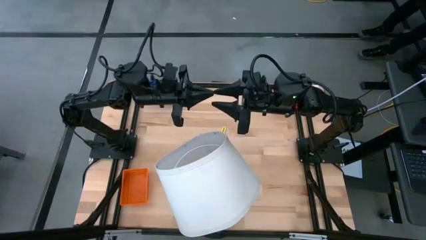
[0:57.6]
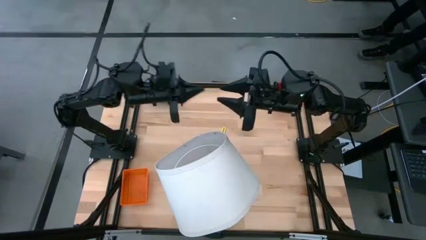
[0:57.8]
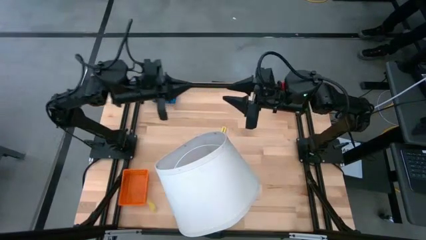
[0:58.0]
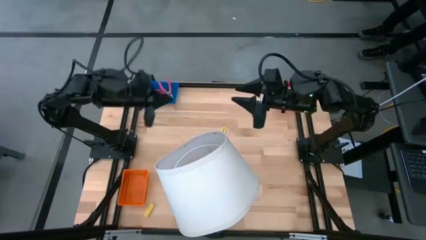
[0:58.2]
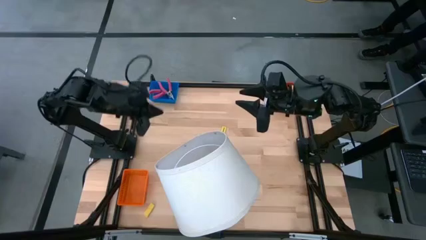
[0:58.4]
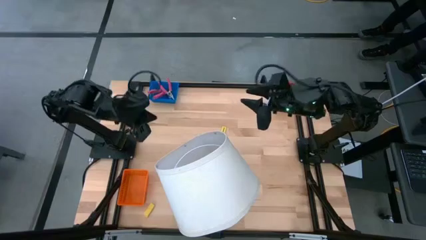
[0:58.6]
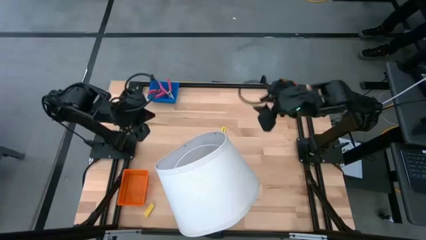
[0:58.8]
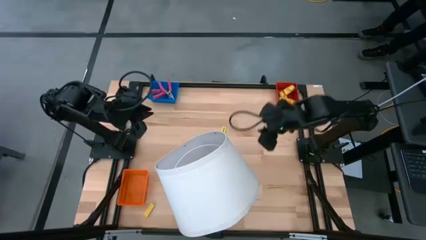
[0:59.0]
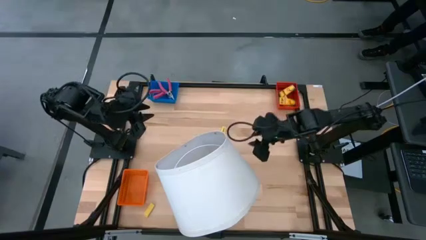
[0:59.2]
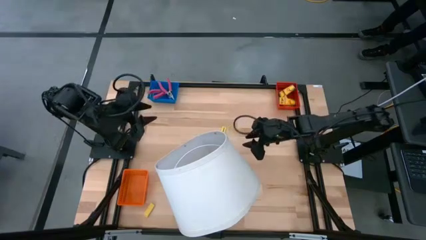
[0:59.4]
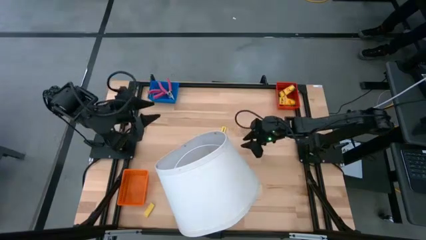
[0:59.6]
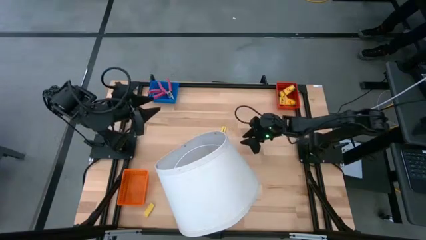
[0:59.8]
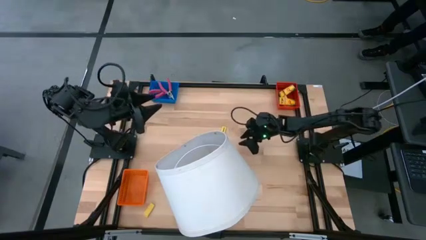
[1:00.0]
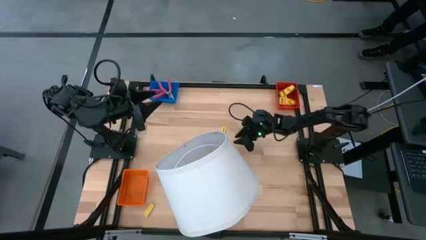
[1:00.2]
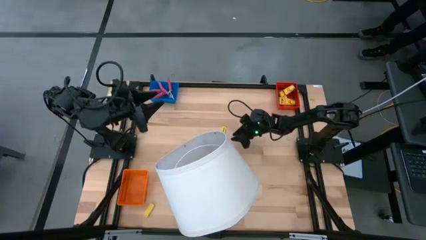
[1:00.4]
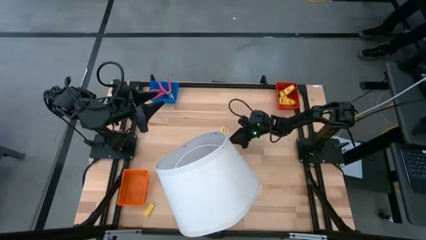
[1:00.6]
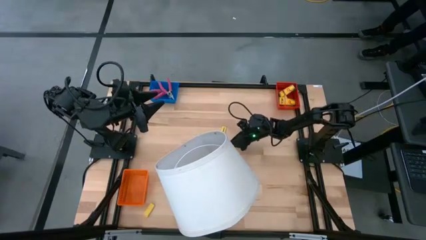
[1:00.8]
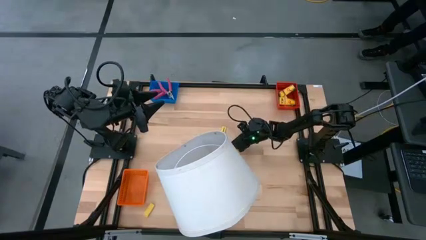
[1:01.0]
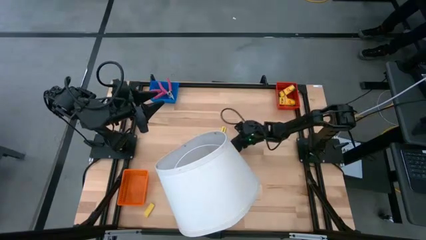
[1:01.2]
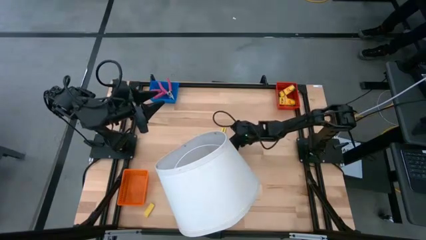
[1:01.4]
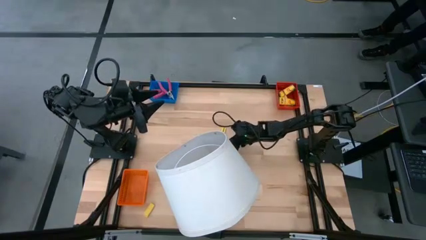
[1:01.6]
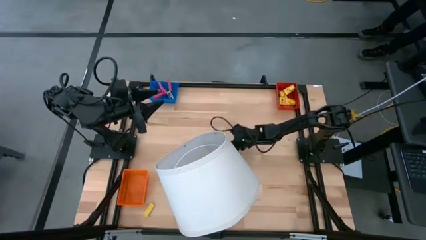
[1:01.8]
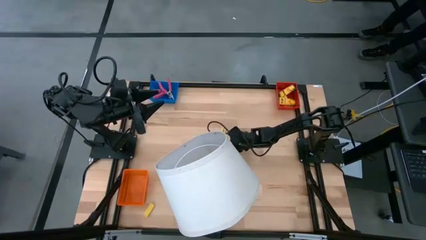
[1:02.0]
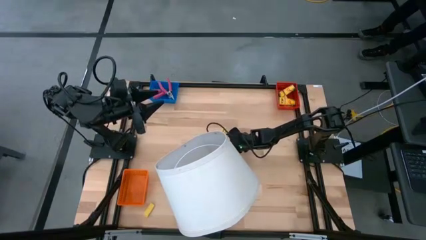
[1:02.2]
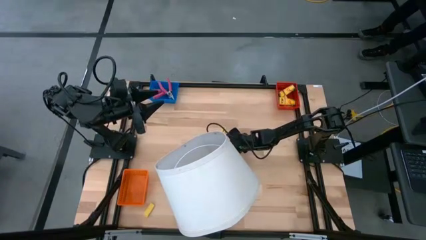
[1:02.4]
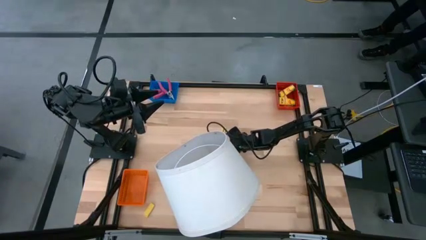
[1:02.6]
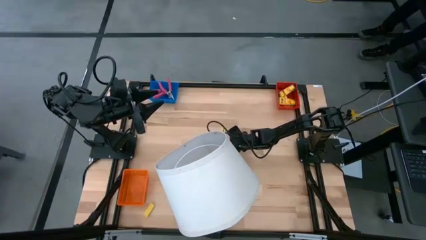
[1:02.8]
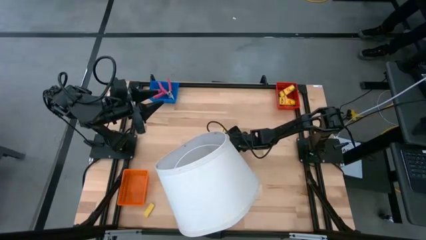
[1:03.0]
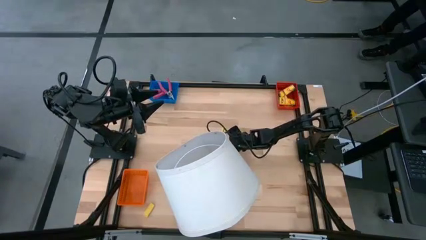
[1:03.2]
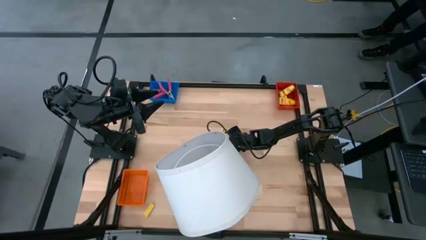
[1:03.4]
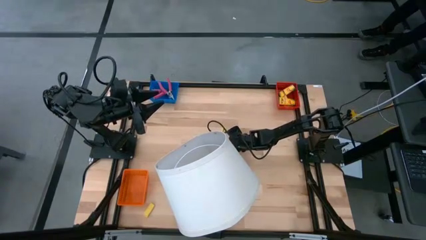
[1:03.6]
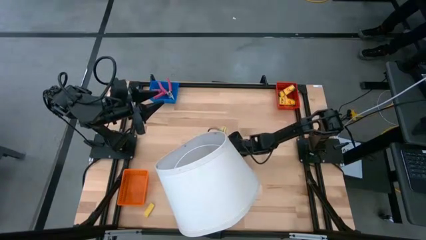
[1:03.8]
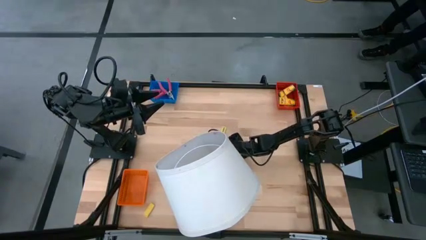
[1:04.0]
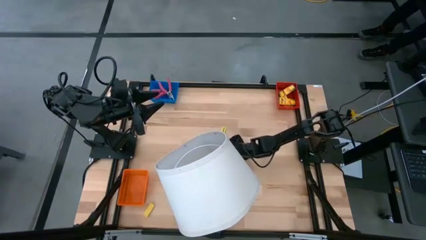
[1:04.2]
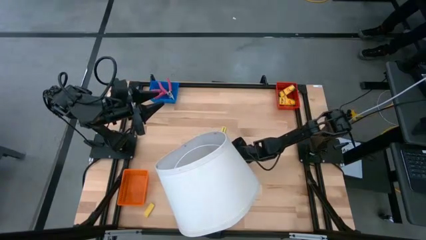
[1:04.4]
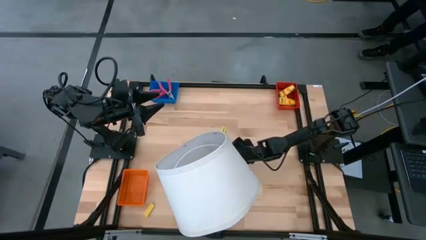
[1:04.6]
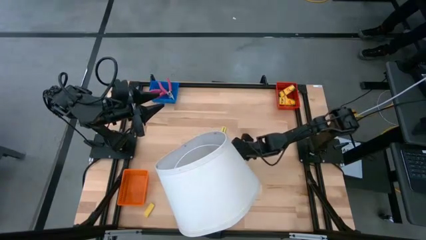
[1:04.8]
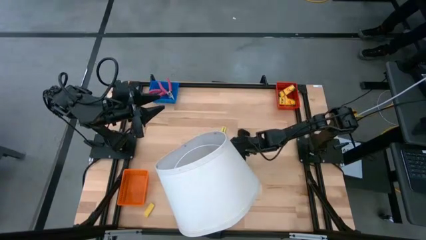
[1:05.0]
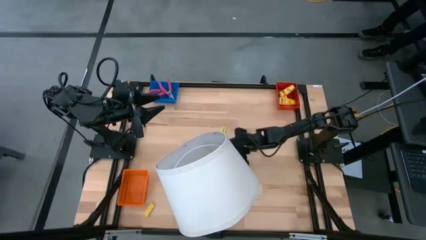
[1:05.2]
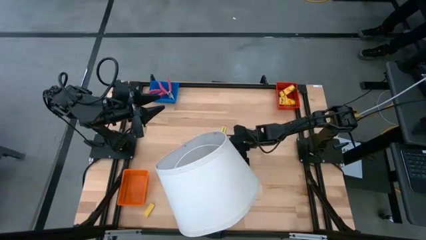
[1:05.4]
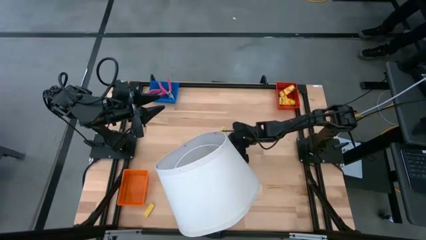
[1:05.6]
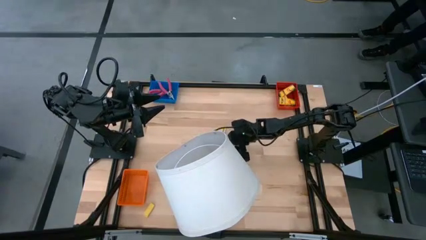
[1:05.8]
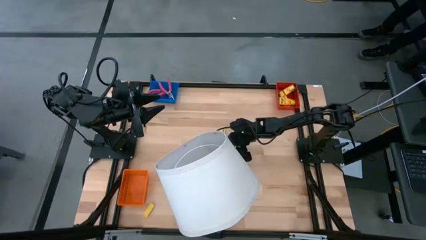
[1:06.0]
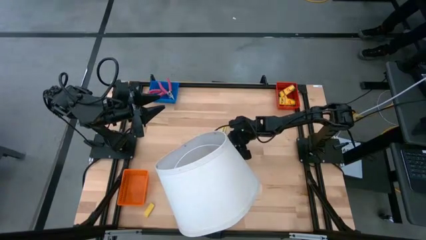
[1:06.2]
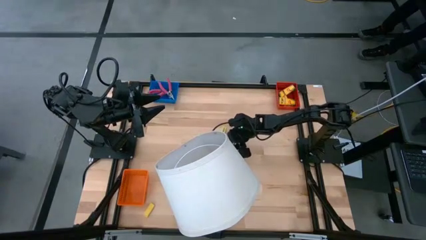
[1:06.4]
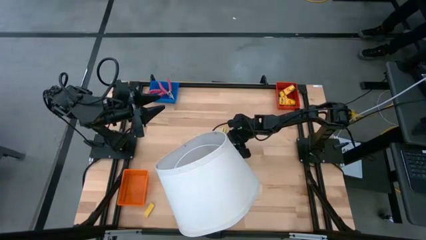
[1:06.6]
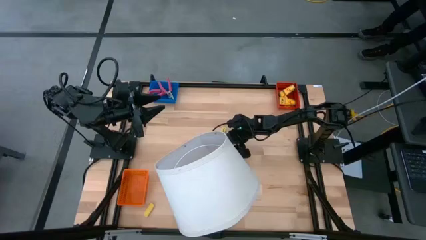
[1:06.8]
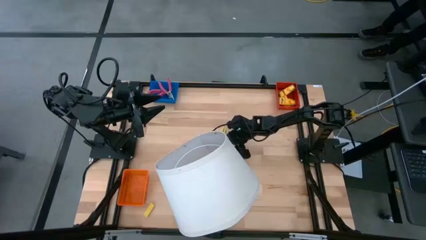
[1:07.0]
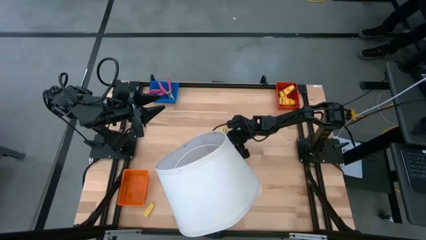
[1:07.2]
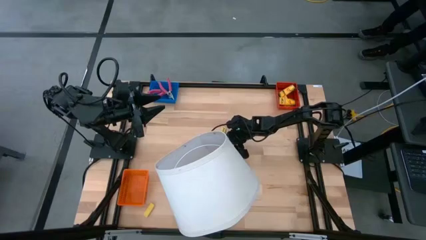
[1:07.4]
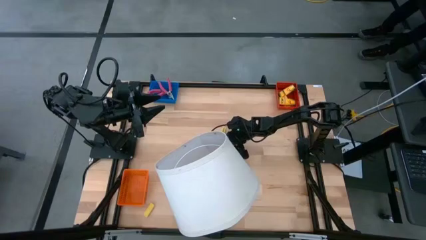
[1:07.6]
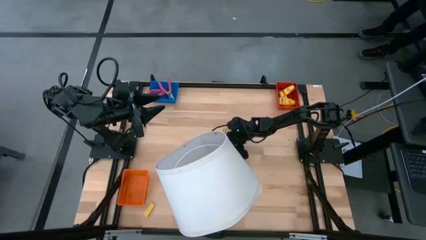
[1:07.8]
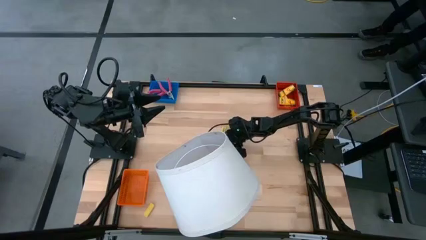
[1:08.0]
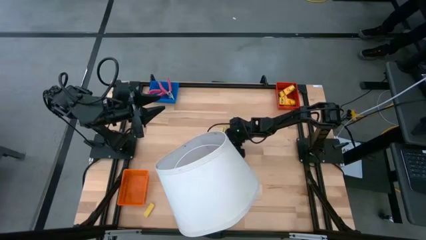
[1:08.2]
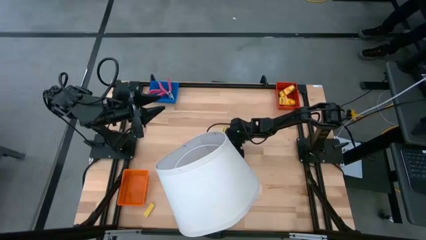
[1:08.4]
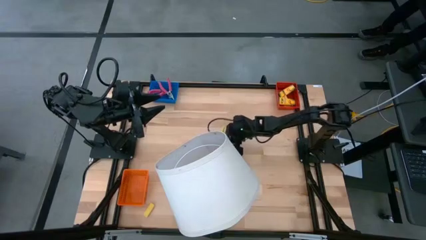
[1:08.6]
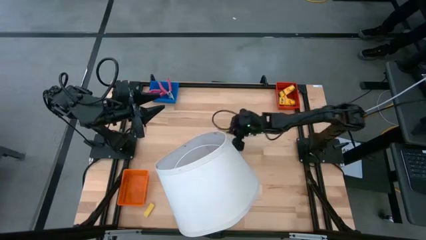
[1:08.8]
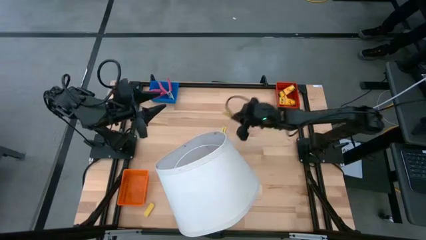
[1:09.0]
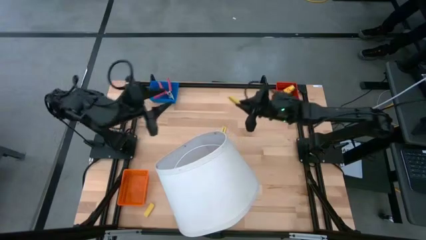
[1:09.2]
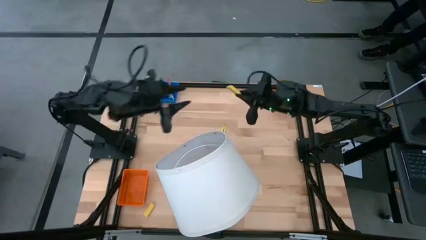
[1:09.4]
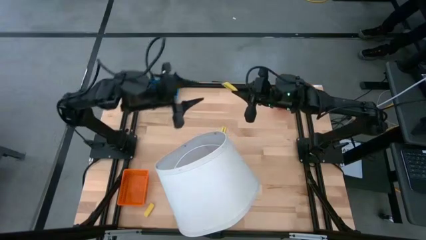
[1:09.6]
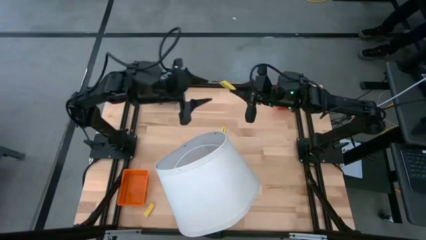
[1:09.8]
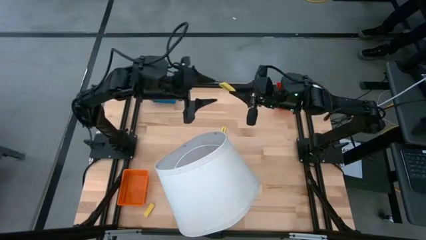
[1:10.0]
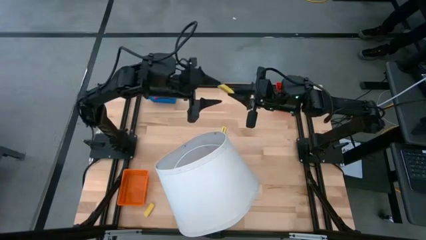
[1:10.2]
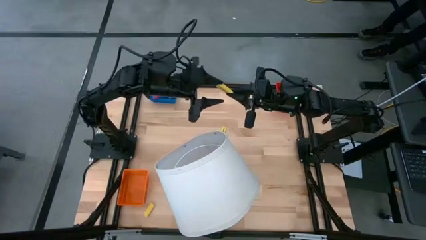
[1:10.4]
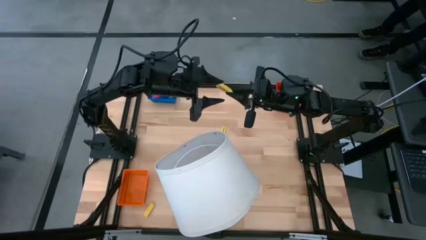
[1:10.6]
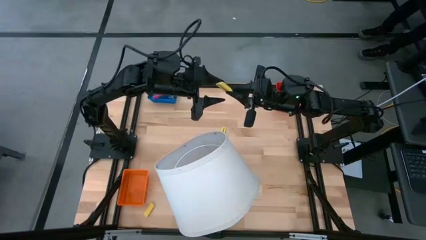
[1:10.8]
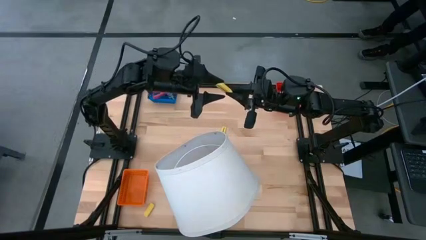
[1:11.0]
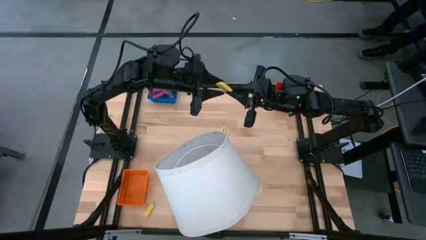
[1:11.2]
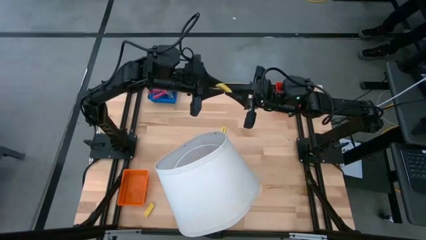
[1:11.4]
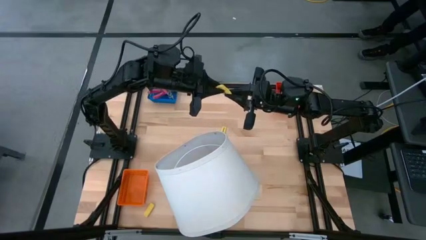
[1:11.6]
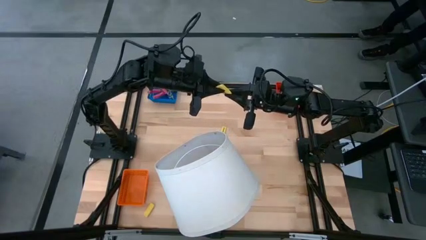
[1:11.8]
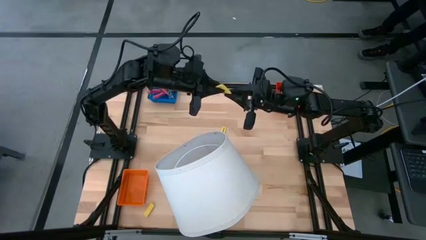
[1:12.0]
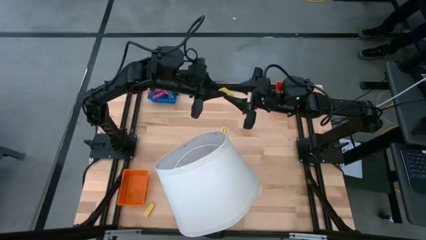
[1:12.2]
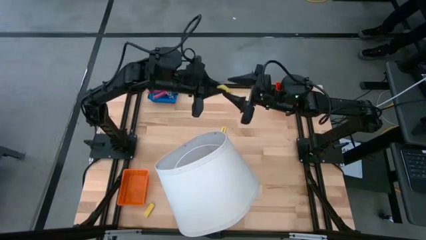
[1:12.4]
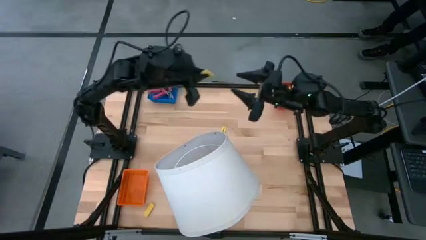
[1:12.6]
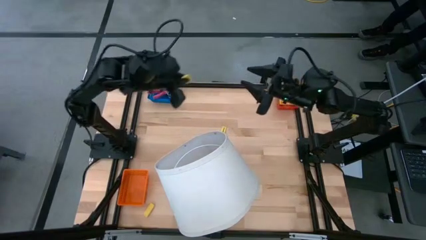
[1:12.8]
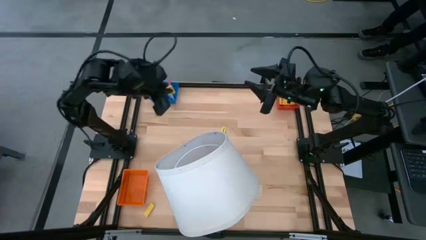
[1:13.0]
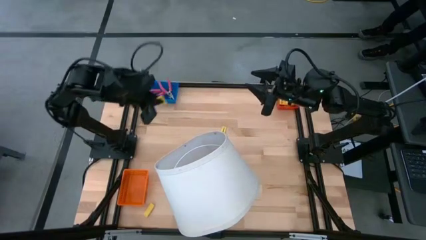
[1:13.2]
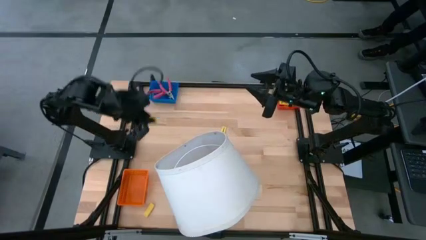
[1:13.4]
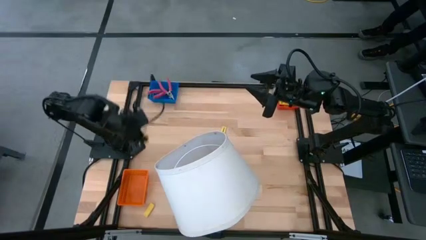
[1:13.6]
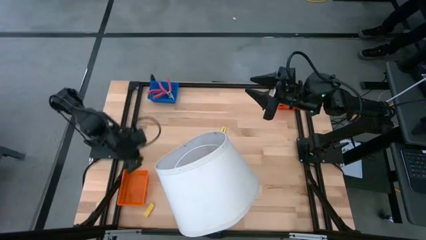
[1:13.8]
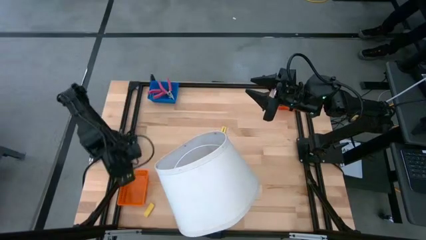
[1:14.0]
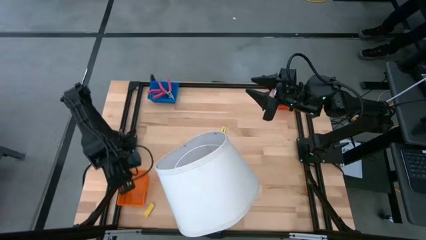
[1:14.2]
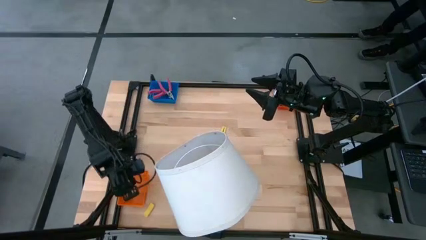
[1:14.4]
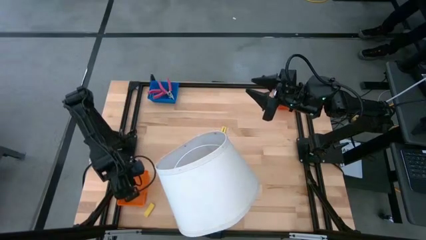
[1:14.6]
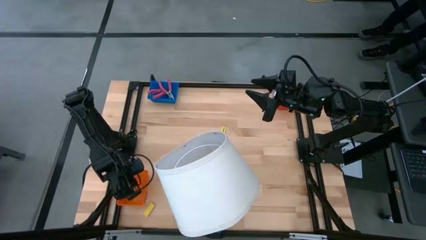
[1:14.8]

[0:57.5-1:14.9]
Task: Pick & Place School Supplies
Put the yellow eraser into the orange basket
